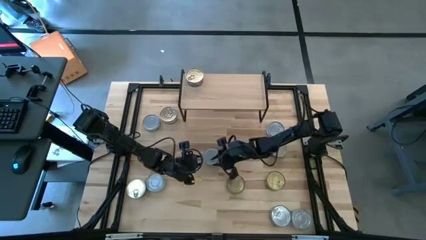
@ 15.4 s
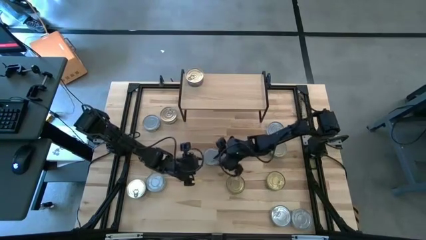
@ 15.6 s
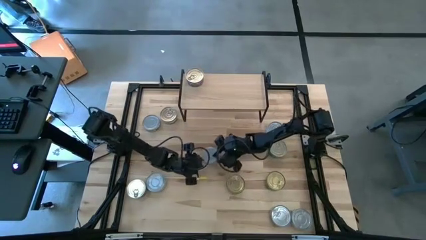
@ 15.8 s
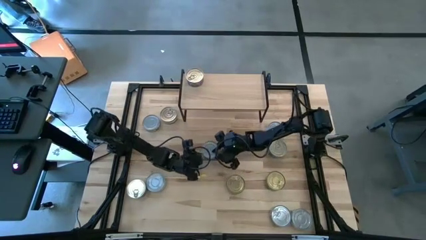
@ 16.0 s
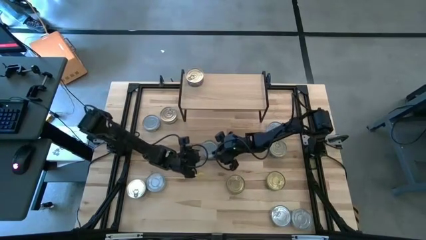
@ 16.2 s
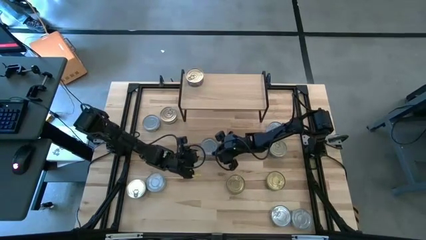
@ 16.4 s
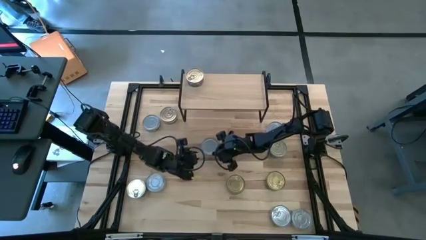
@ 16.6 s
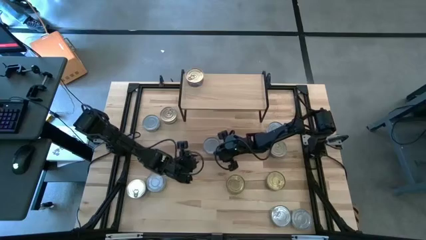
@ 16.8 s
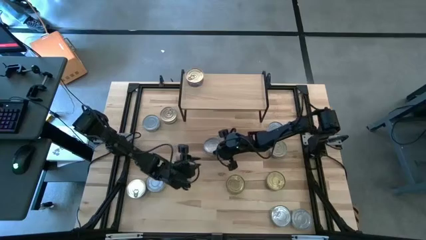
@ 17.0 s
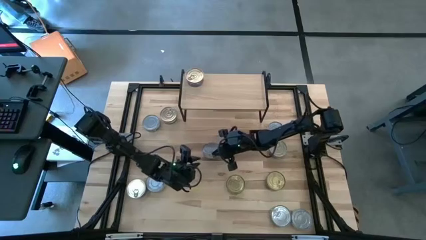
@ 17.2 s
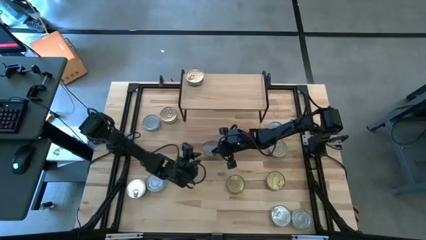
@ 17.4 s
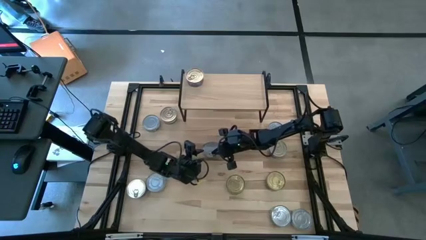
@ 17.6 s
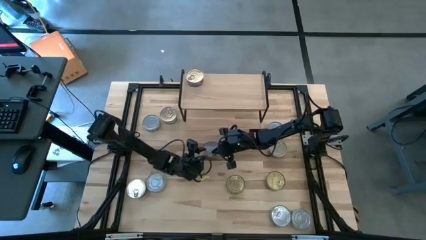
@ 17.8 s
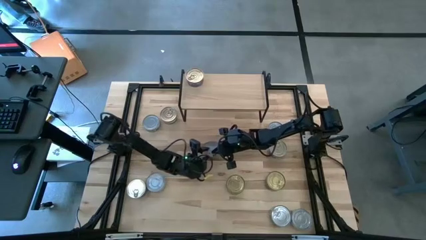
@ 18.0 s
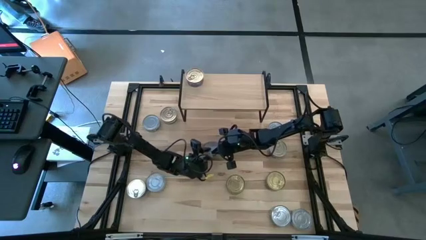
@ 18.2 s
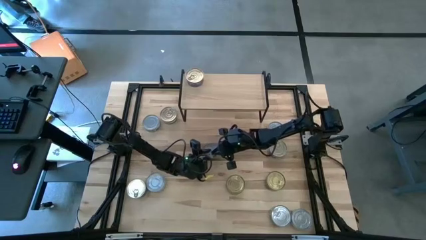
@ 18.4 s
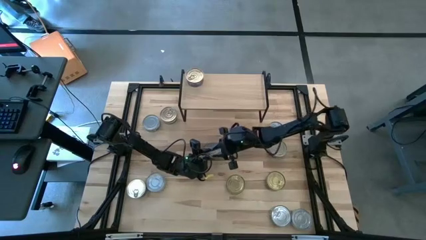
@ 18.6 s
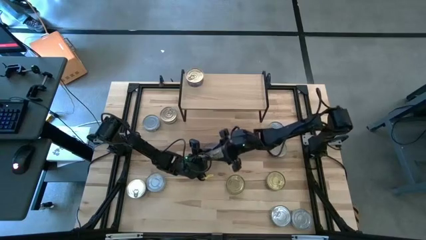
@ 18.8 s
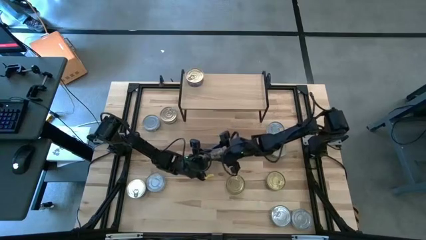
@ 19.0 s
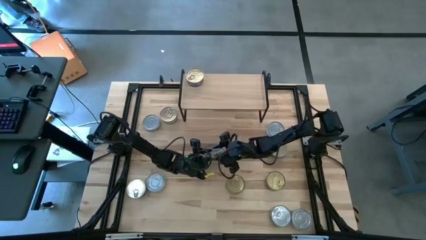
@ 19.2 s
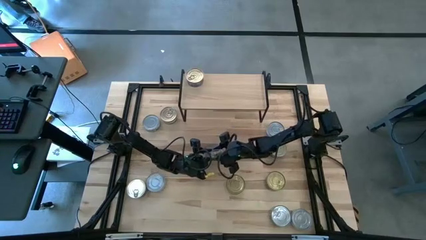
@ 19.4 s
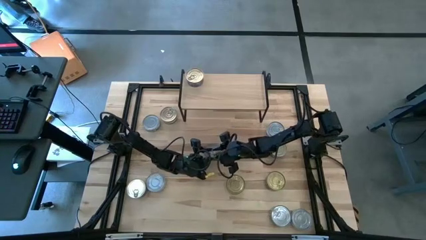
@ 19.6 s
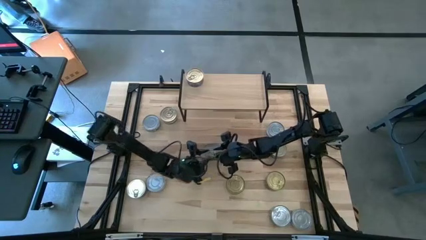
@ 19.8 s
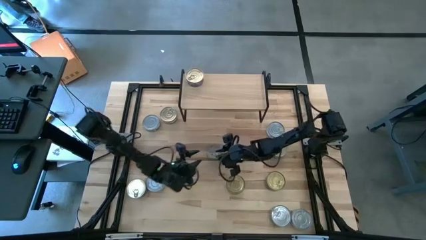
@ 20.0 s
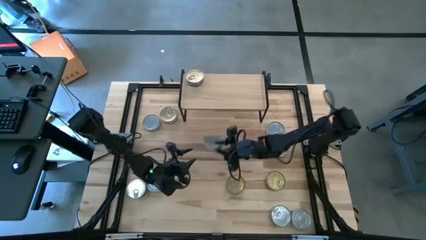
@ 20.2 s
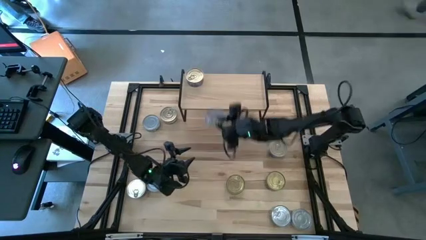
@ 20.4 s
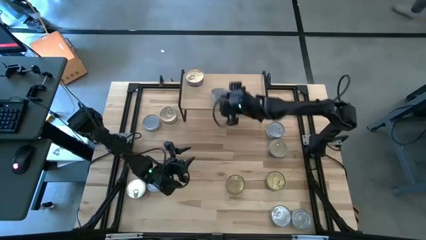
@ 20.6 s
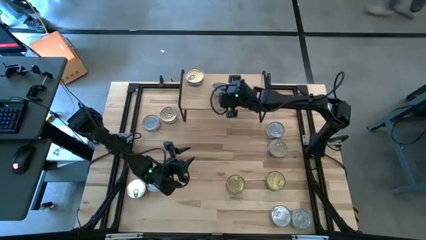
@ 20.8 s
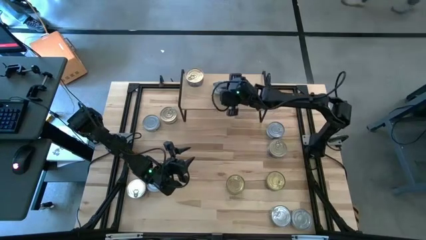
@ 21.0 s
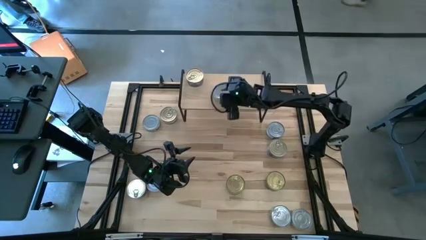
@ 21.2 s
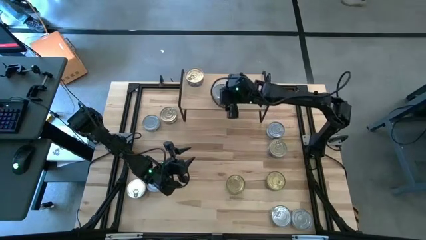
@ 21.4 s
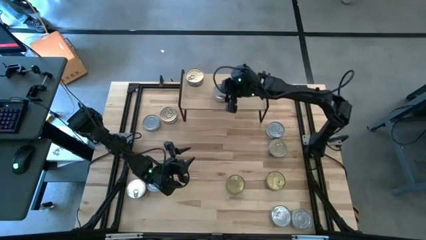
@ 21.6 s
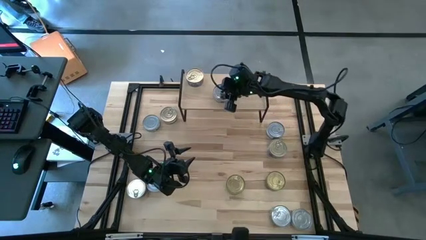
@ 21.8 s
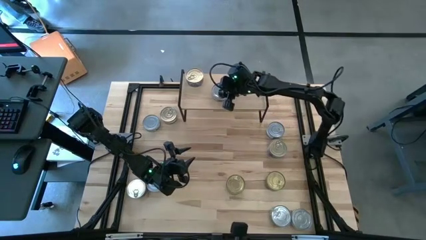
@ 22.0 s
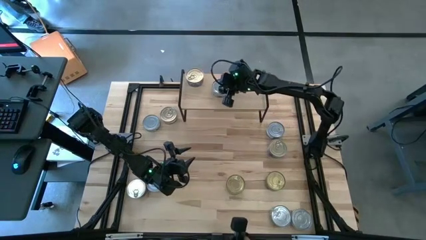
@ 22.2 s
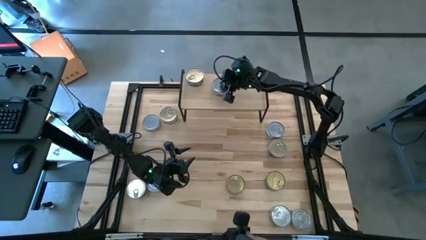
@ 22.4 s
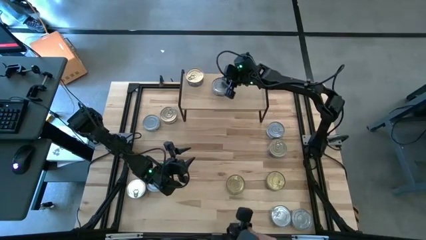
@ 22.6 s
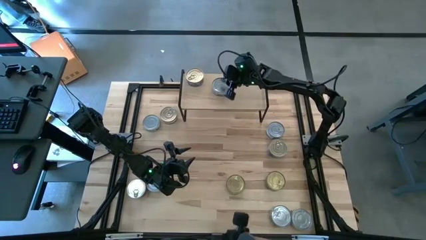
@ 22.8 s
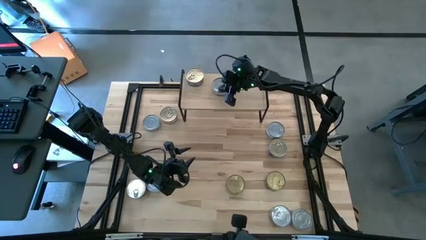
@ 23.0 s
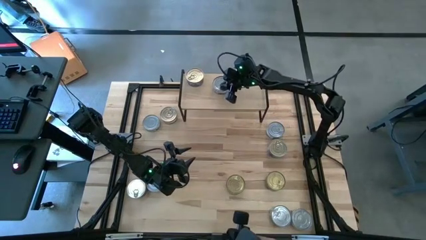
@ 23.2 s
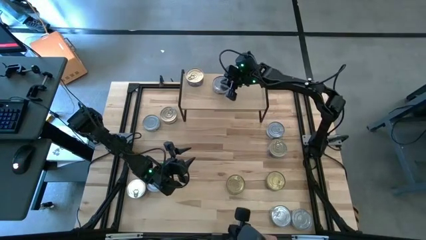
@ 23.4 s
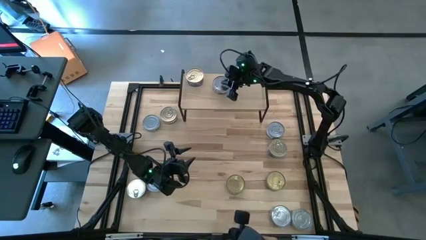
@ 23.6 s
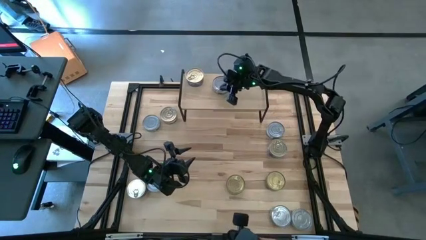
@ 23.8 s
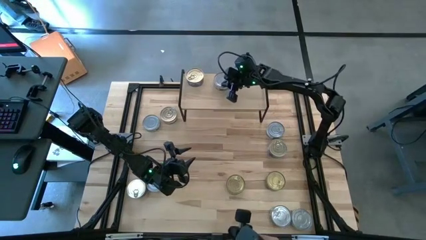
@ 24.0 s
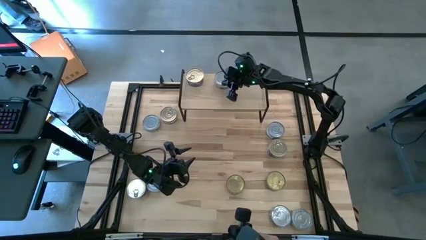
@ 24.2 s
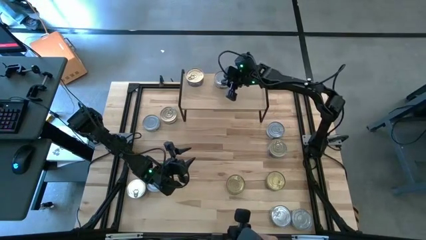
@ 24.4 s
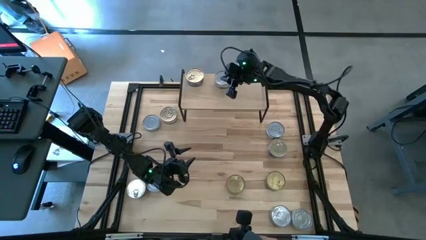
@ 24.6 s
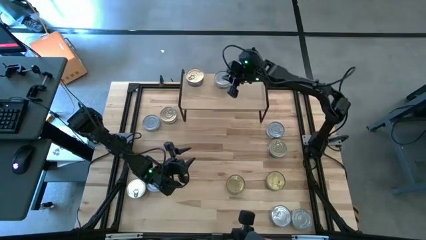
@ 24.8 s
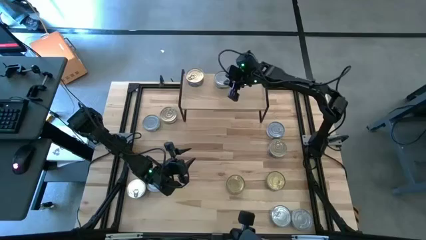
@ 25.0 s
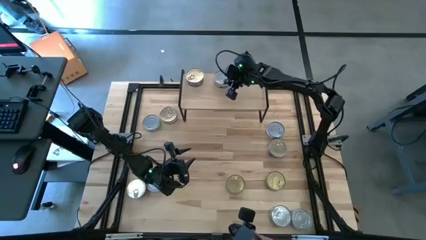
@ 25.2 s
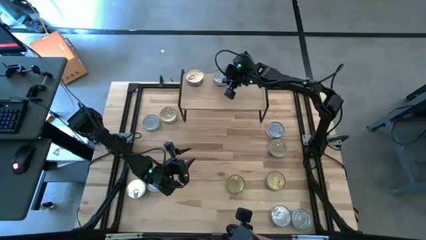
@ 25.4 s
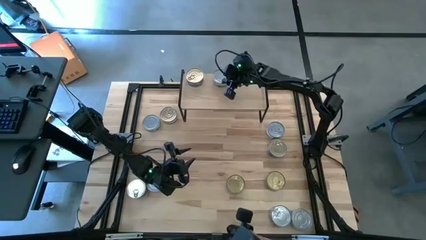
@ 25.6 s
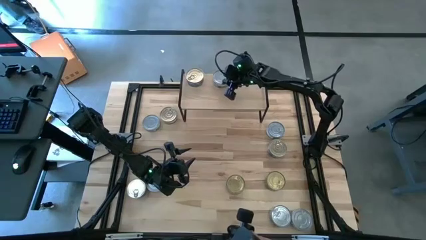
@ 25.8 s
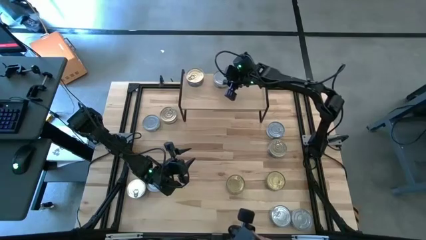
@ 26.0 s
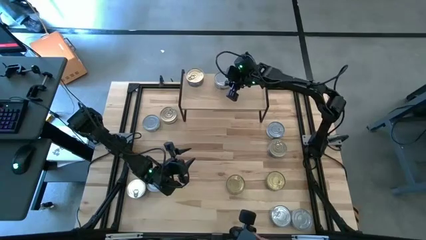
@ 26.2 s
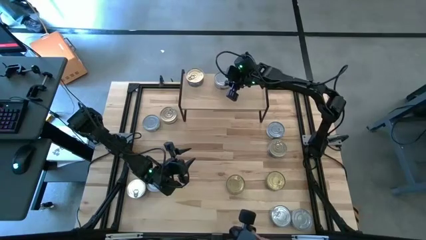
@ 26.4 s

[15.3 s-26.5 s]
Task: Stack canned seafood by type on shelf
Put the green tuna can on the shelf

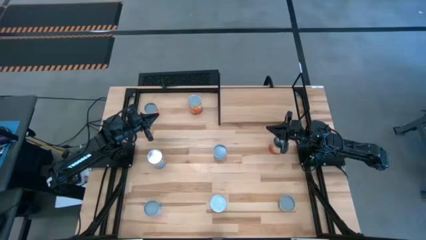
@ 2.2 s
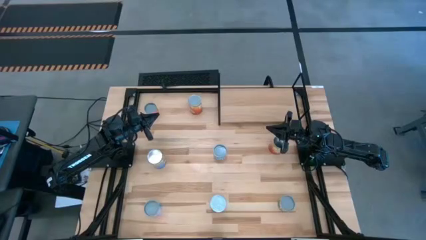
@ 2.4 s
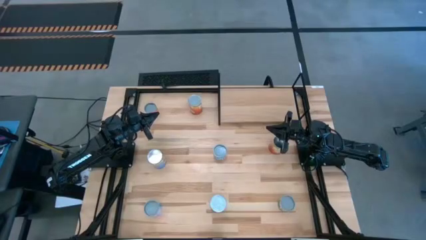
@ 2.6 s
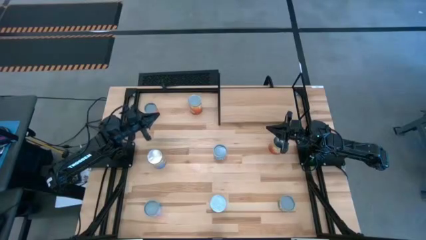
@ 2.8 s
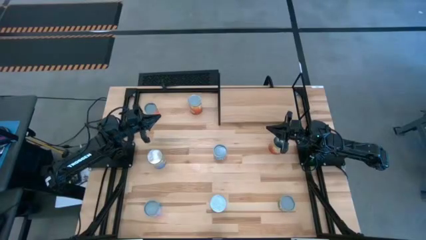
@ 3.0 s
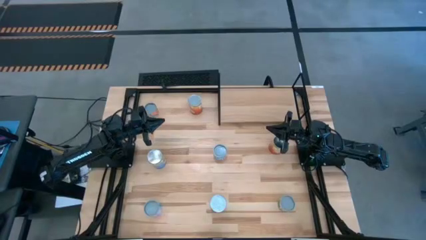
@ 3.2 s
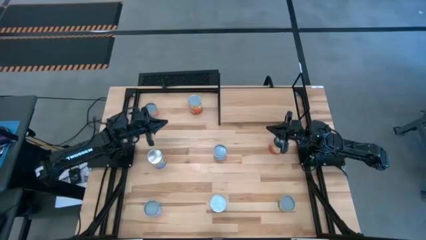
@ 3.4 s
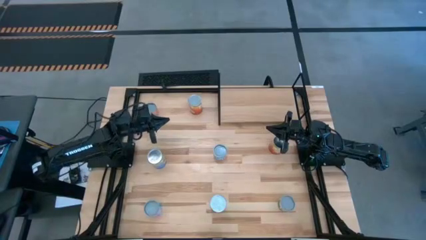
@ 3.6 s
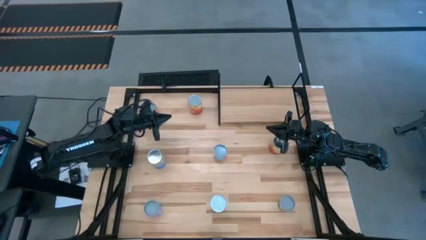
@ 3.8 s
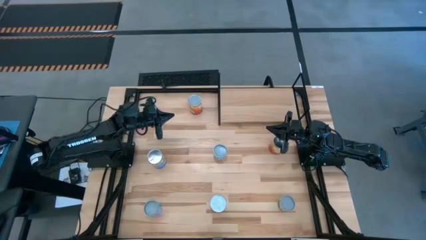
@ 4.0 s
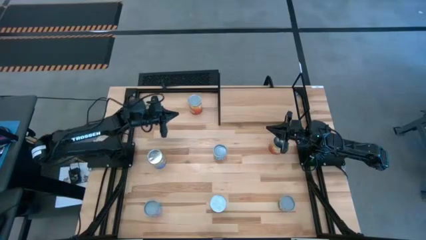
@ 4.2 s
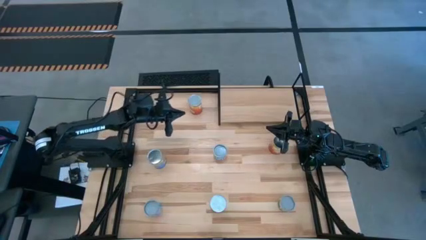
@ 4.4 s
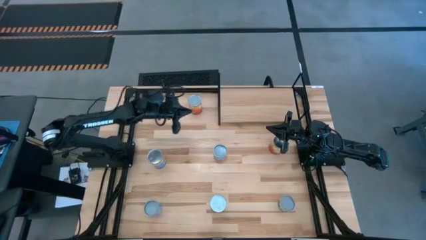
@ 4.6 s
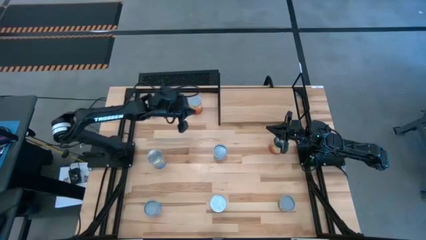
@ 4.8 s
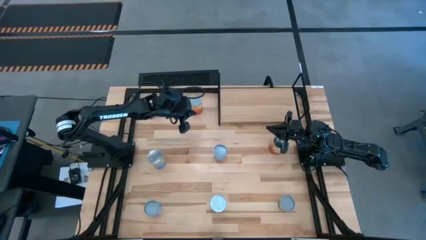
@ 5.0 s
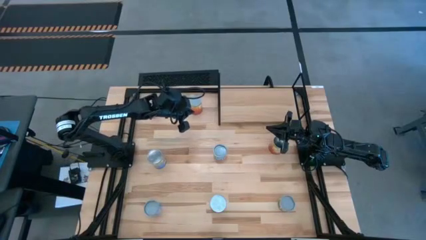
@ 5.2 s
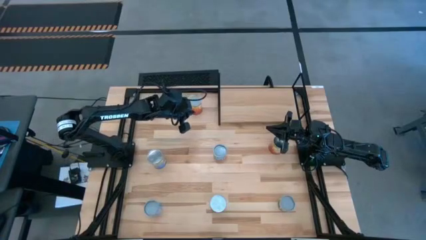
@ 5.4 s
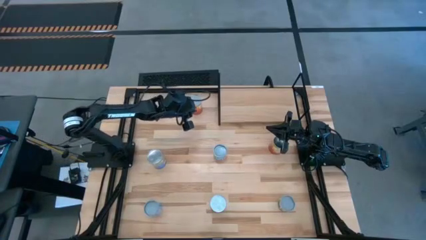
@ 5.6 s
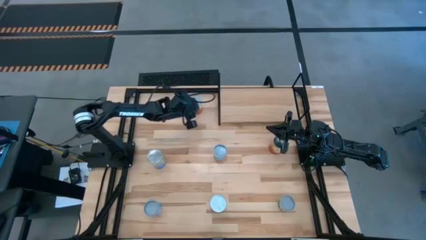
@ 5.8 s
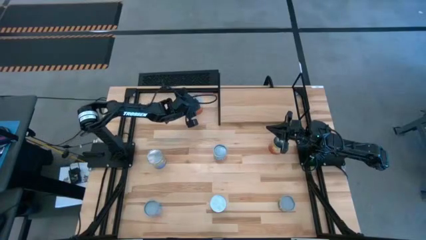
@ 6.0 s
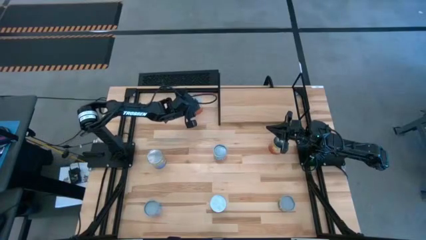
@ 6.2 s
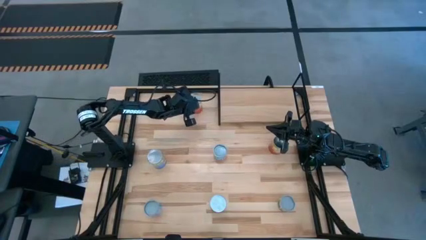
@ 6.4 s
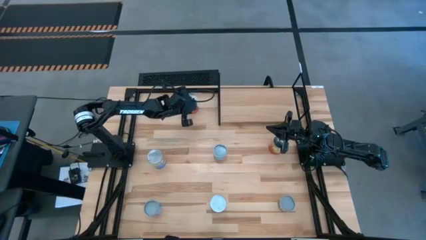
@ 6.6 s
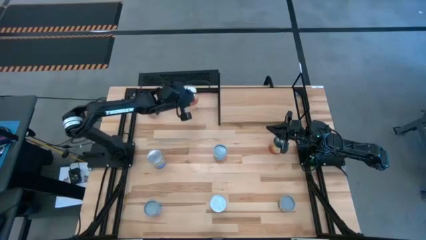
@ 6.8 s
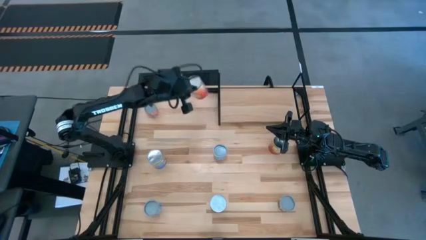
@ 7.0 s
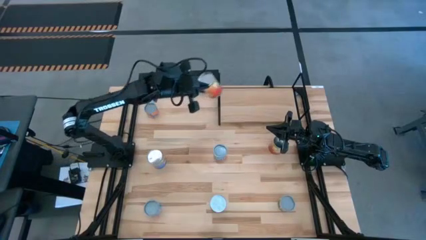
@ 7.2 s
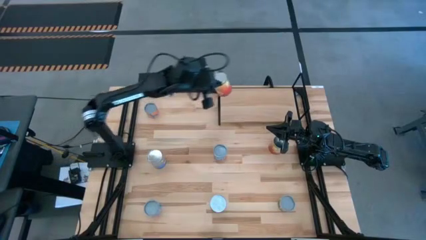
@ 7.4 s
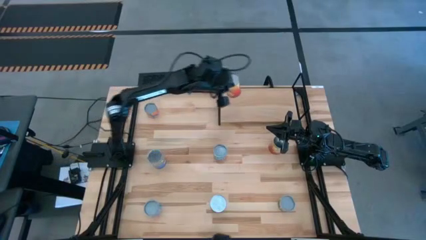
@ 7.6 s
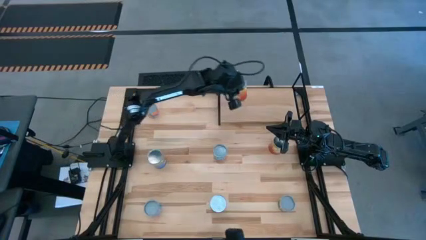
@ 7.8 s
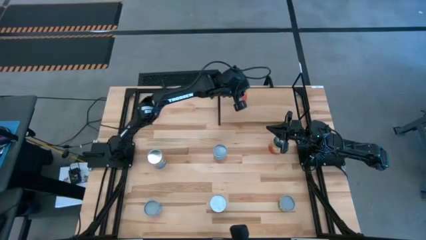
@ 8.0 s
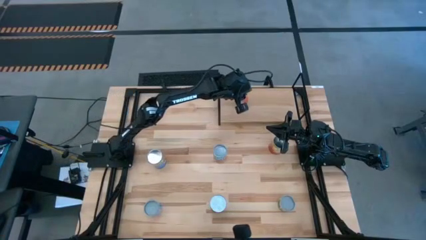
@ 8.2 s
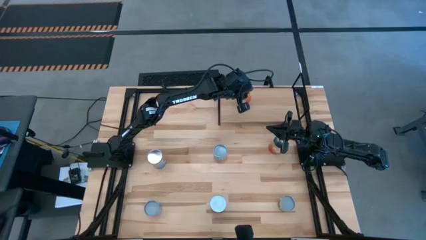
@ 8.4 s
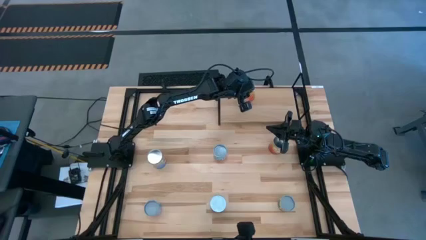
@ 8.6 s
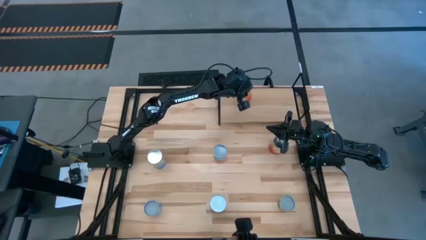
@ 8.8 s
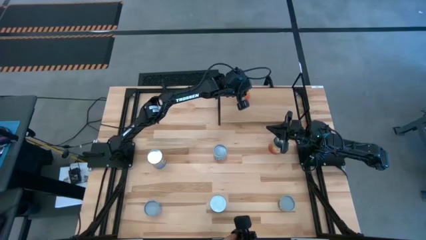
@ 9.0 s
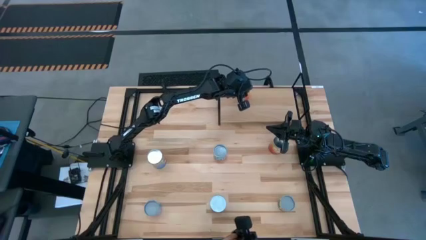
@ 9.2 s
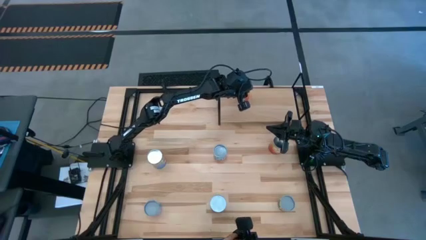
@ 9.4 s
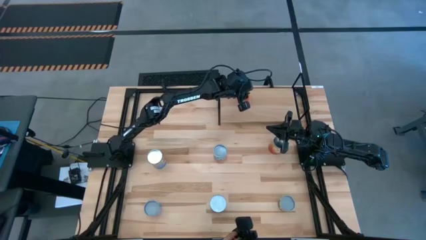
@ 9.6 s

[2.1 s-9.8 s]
Task: Pick and place cans onto a shelf
Put the left large canned corn on the shelf
